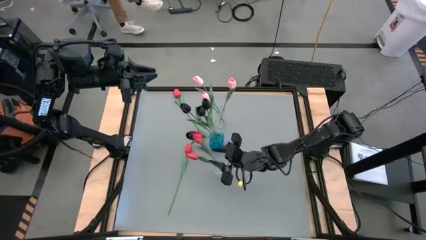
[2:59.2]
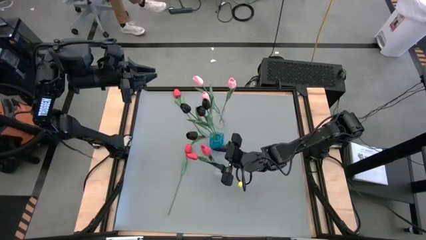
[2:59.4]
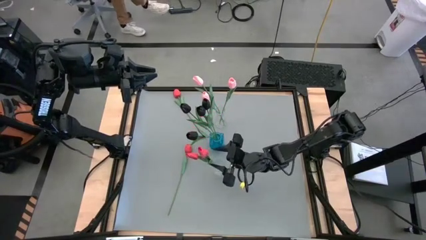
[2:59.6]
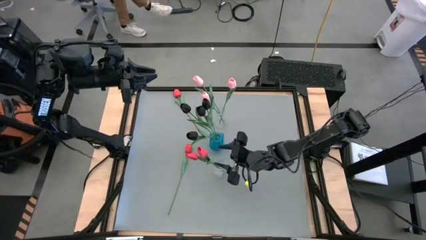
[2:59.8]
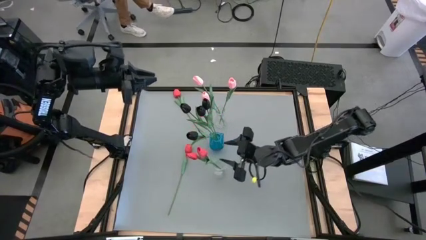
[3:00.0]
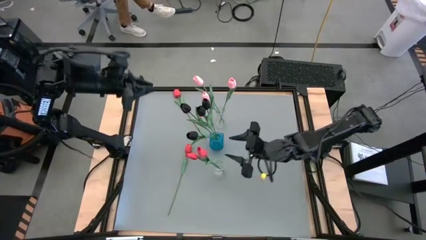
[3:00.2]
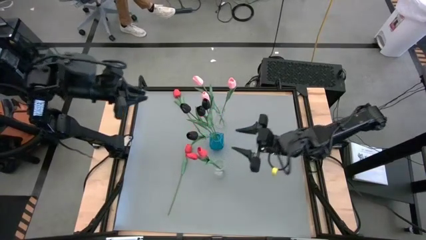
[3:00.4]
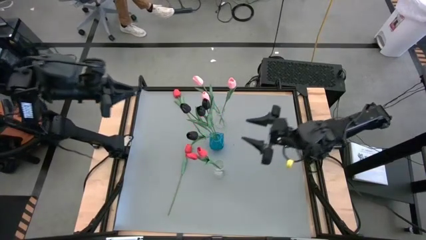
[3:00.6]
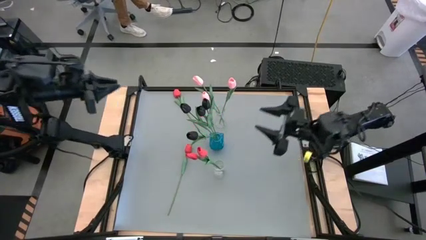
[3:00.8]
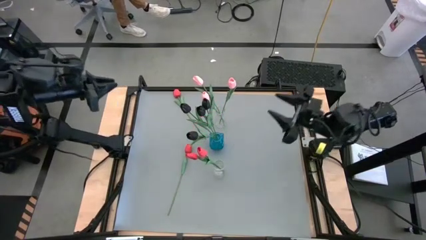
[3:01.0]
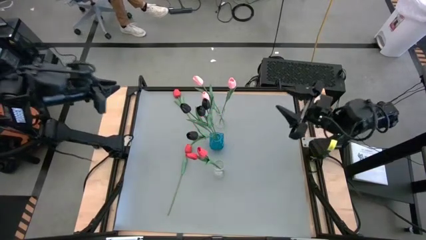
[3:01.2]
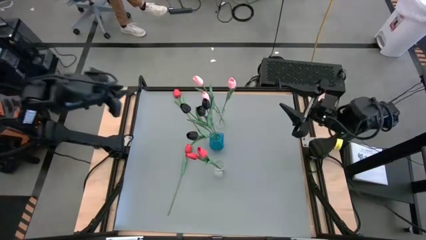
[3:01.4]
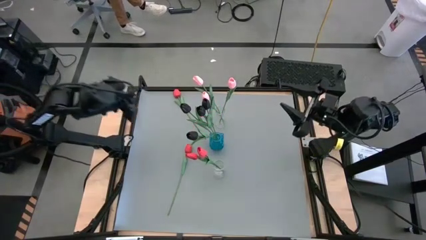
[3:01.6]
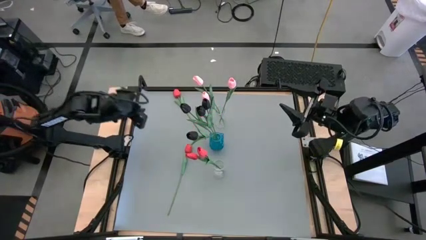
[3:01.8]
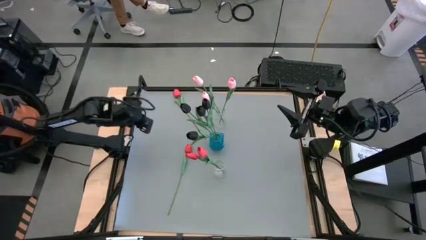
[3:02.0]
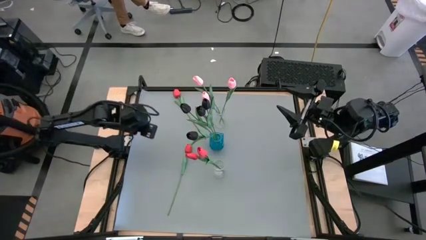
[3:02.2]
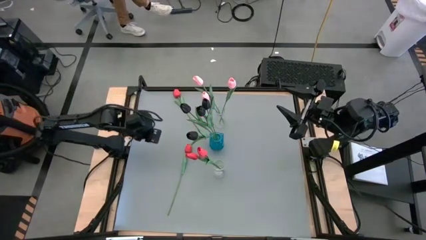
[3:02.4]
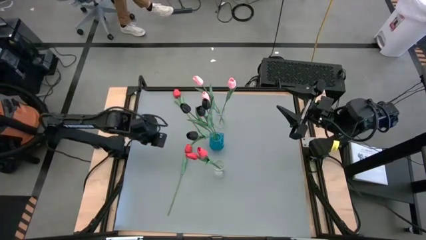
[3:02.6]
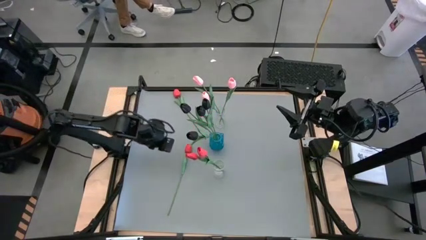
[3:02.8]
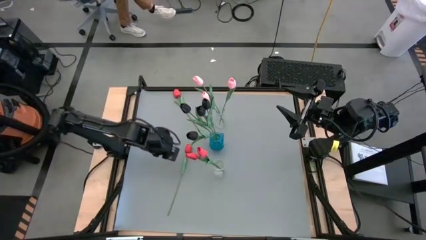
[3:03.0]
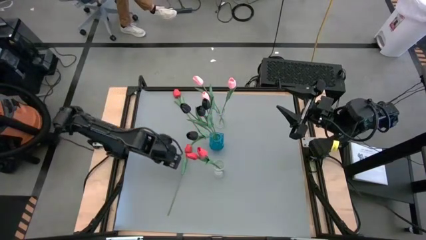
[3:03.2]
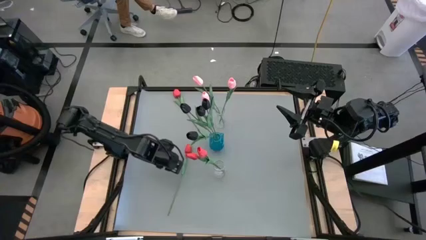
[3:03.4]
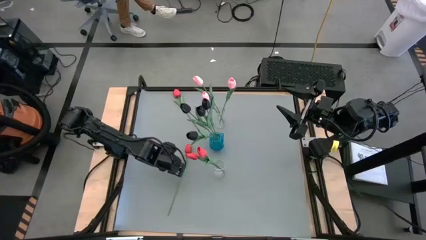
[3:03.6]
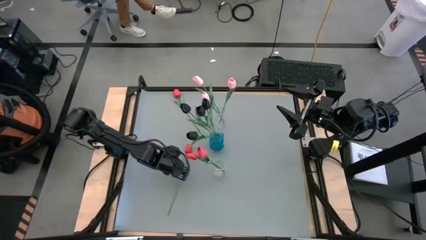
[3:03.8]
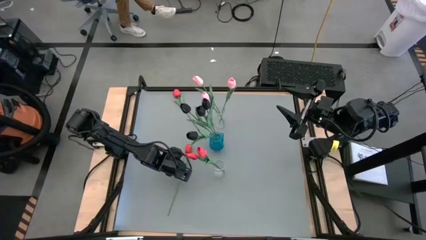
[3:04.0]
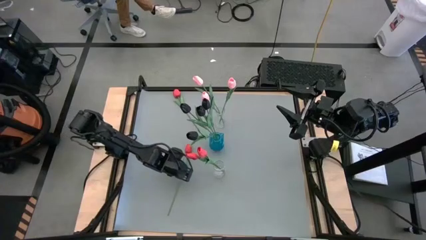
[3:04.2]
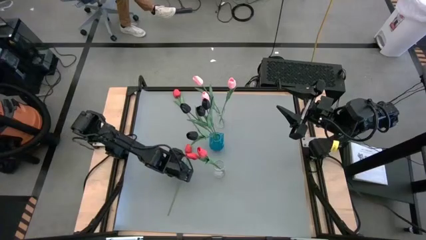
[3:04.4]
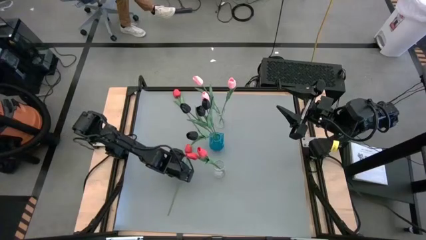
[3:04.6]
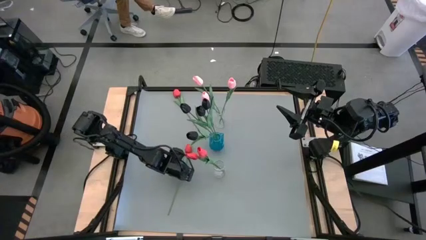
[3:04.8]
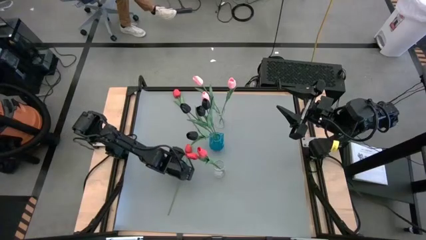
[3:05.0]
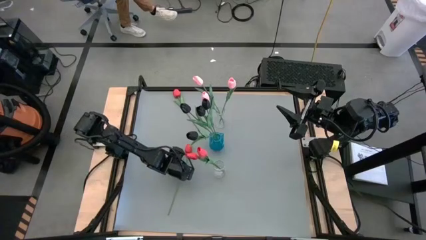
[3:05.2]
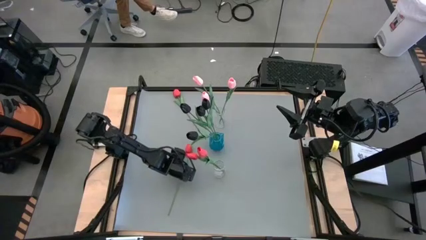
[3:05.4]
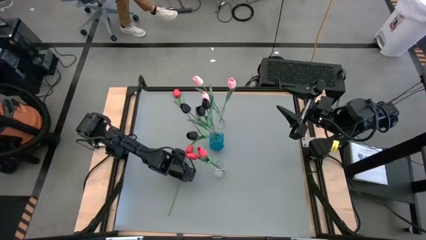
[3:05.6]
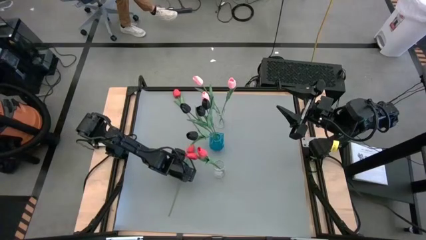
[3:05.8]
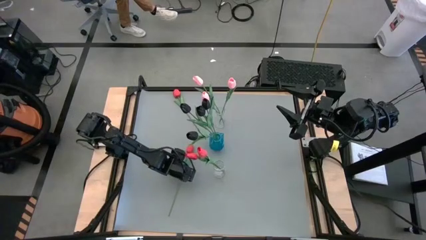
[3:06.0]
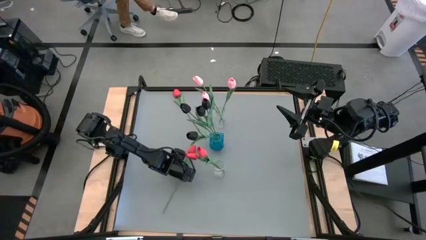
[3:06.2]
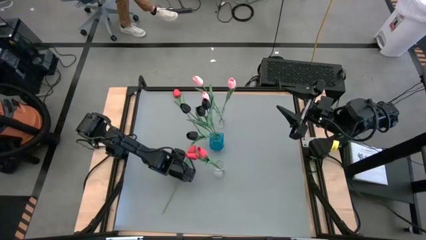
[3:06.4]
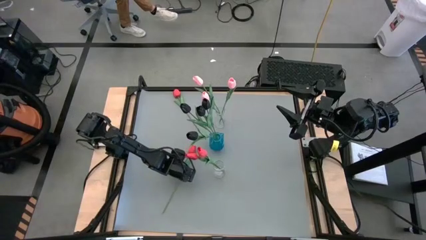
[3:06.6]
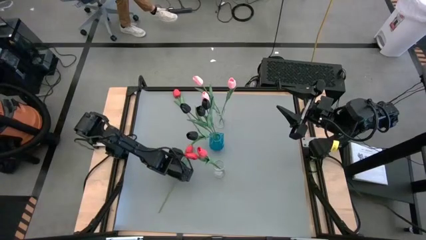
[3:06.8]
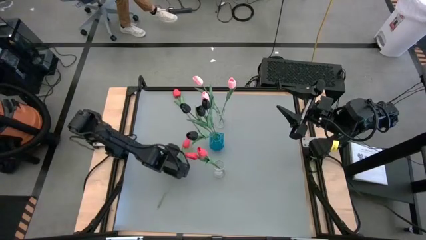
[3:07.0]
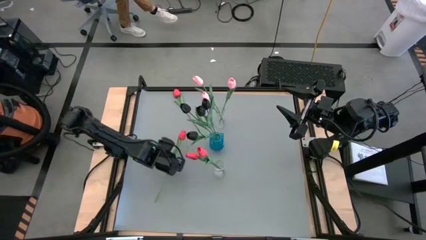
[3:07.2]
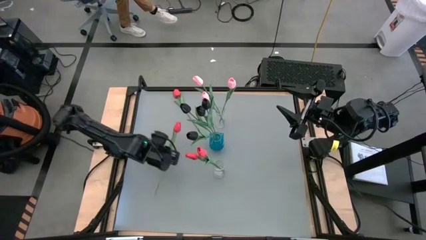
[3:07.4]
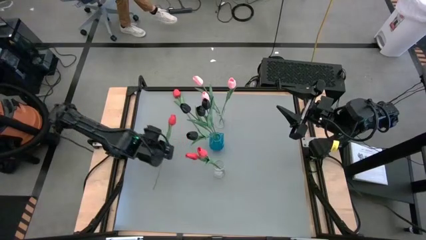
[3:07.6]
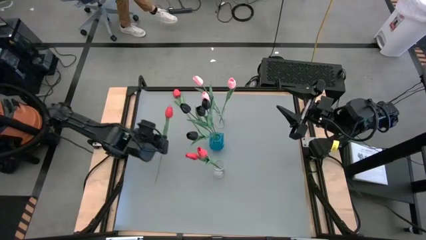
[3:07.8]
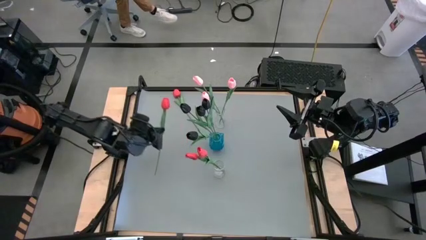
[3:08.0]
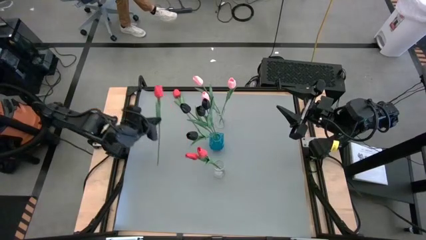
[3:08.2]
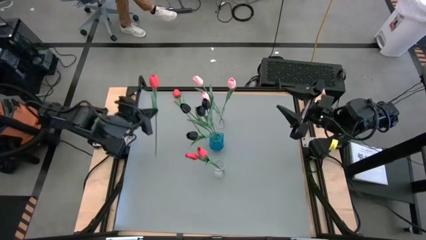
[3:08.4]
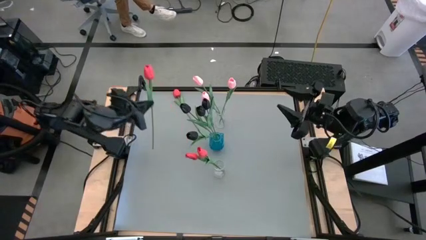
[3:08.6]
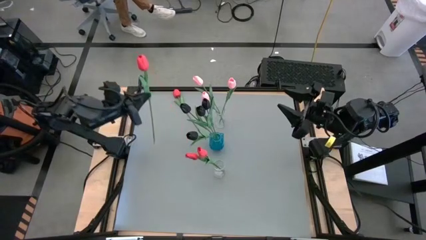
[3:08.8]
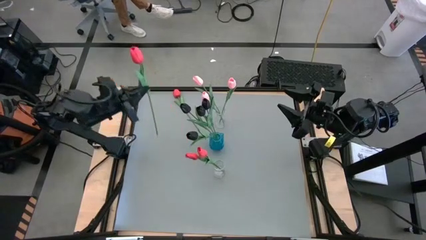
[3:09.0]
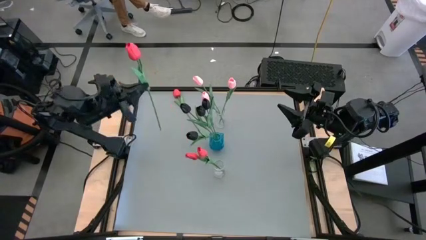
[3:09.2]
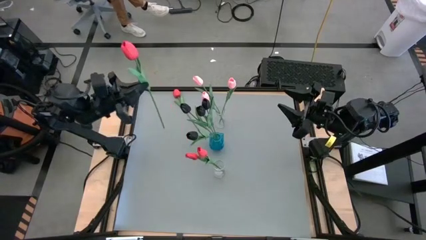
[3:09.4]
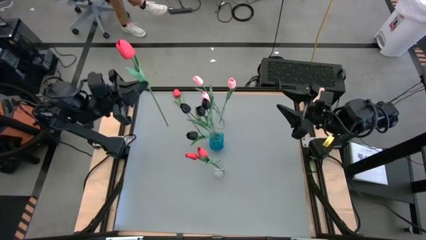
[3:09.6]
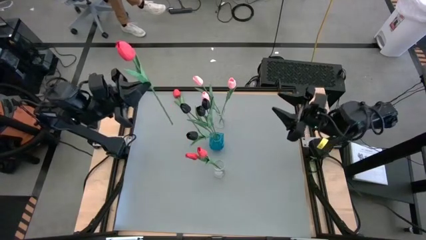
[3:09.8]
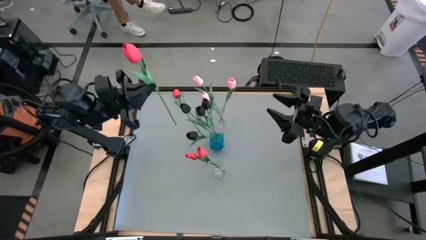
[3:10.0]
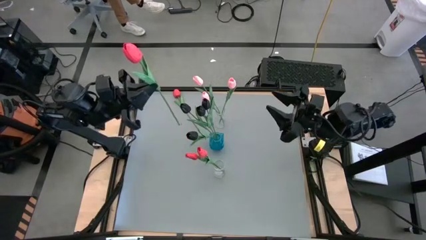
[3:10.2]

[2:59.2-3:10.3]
Task: Sort flowers into vase by color
Put the bottom red tulip into the bottom transparent vase
